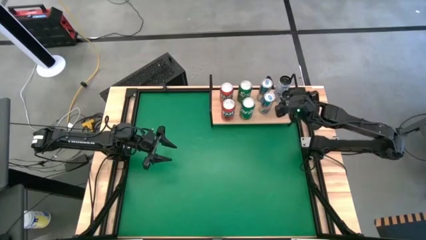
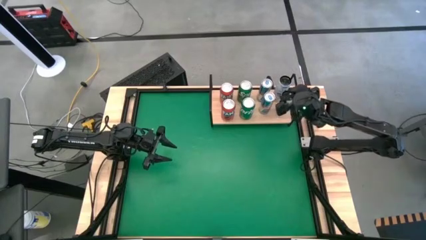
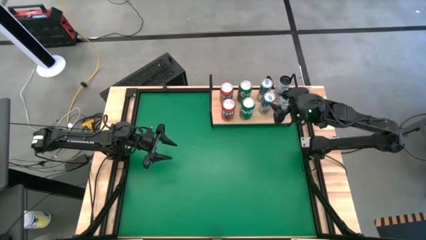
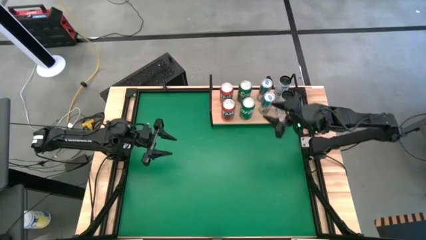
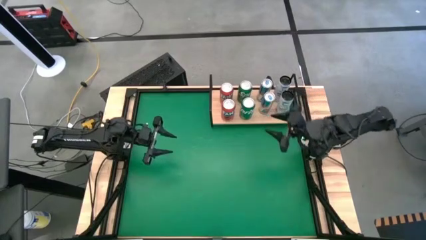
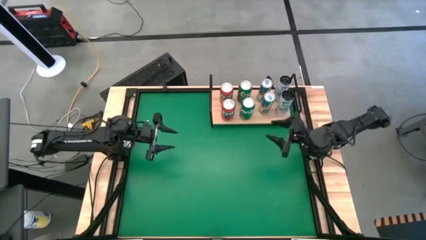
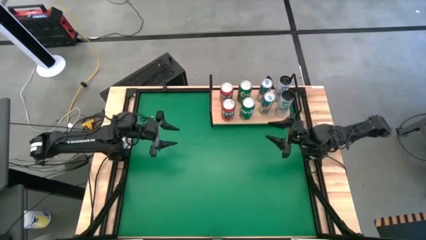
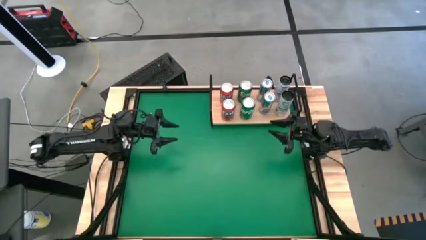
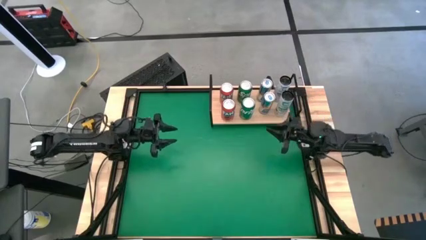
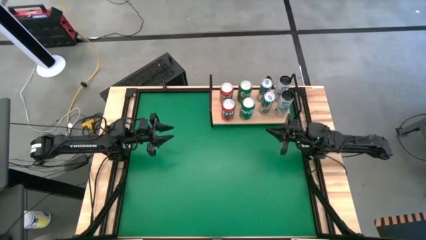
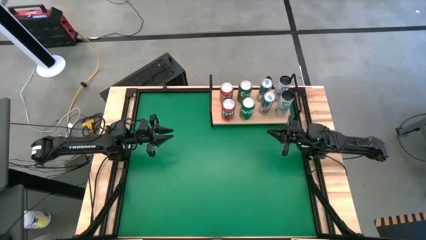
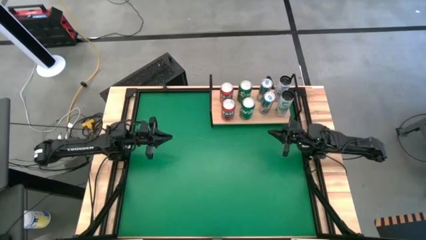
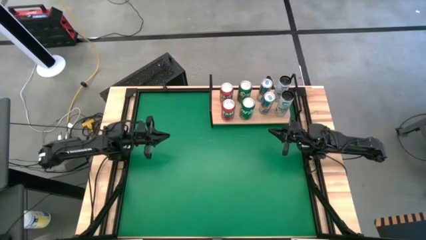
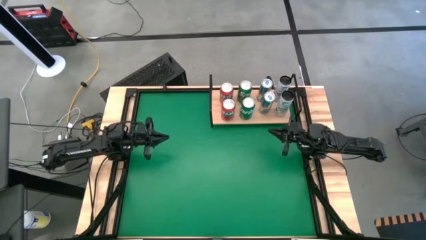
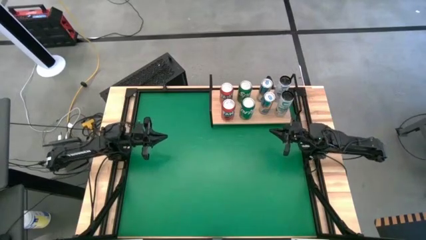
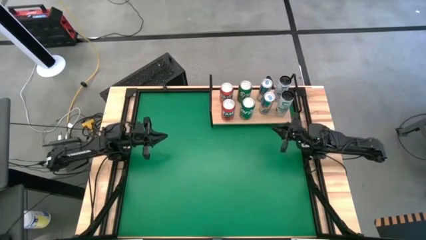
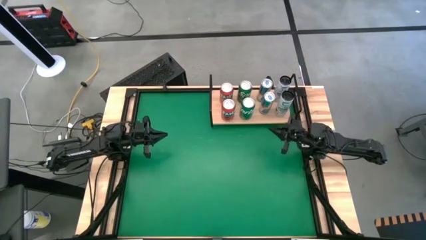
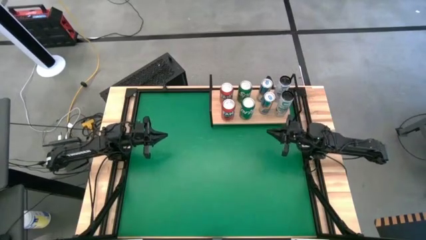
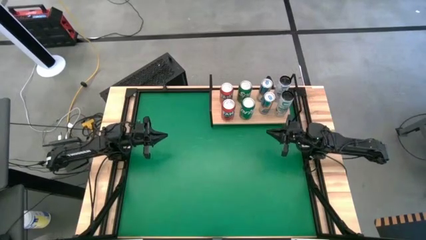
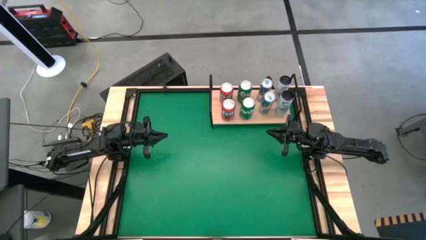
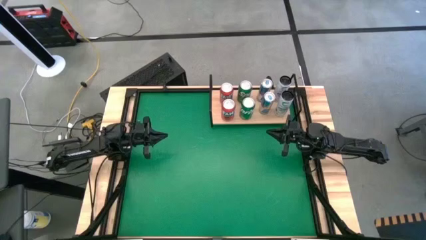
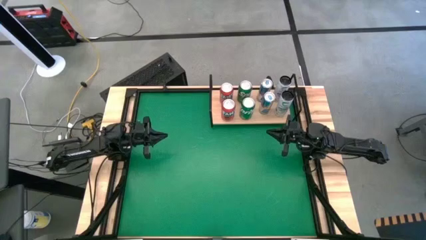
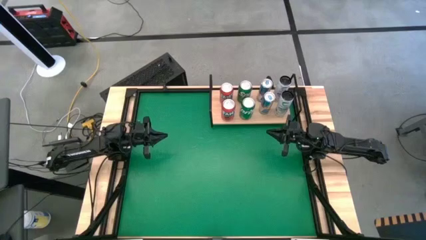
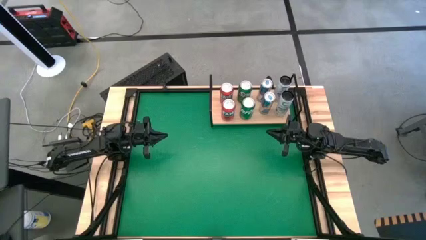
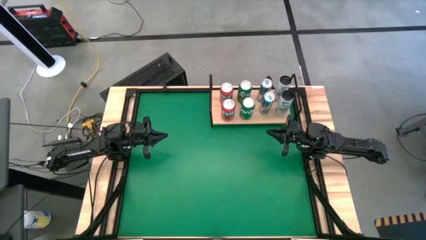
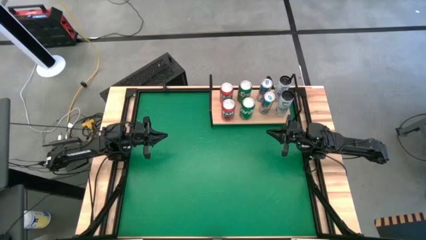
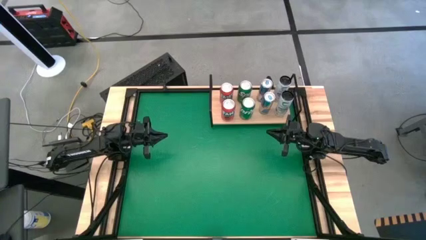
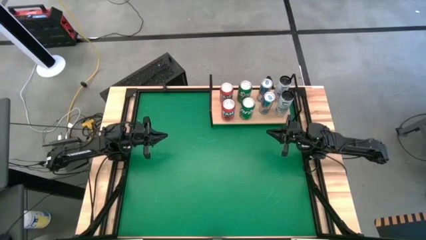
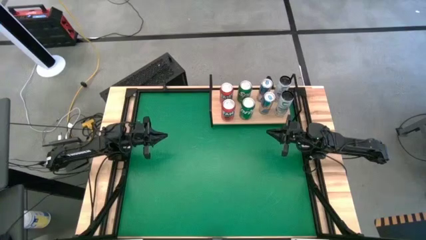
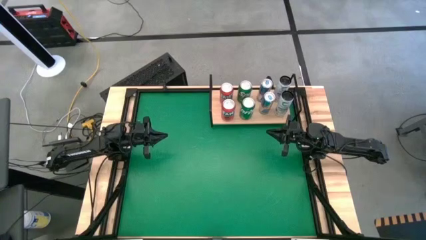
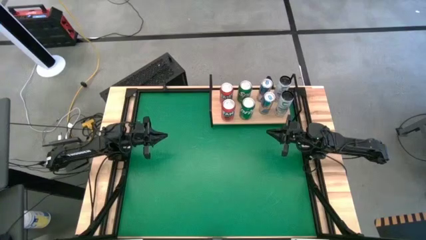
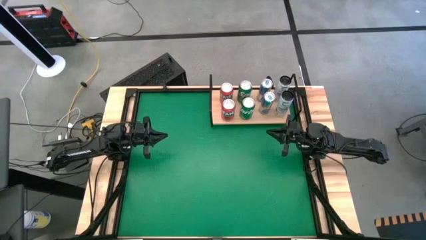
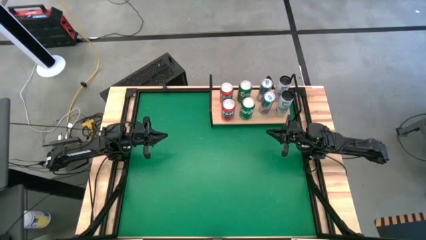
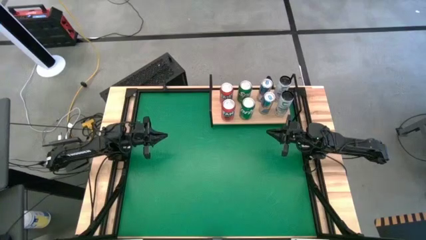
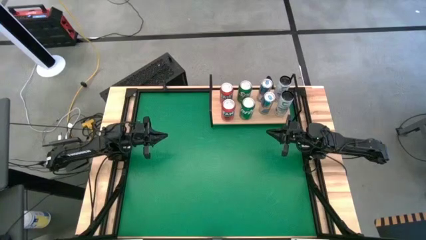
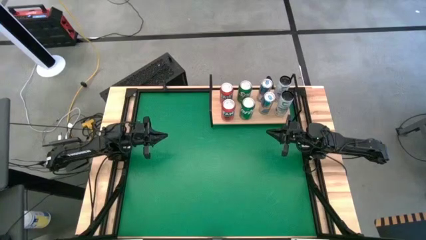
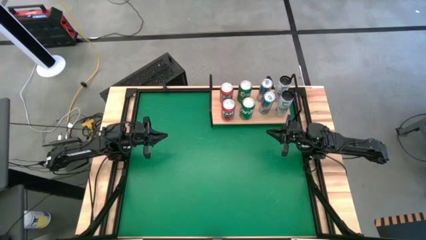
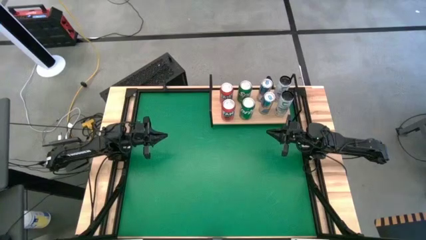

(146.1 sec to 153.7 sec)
Task: Place canned beverage on shelf
Return to Home Position

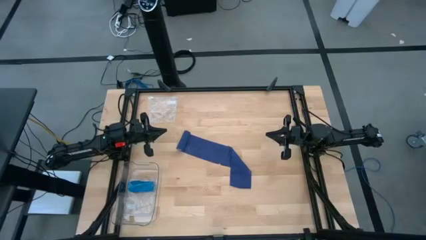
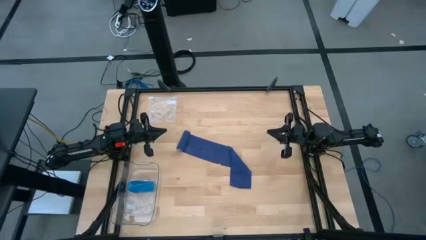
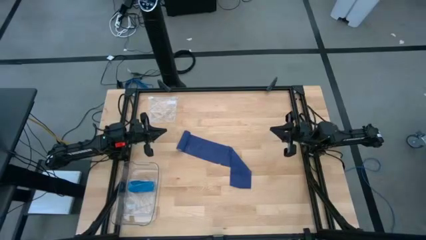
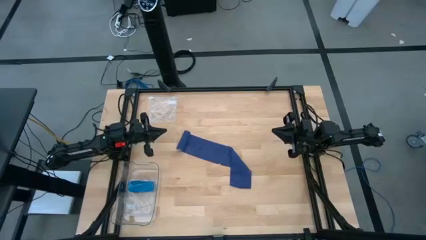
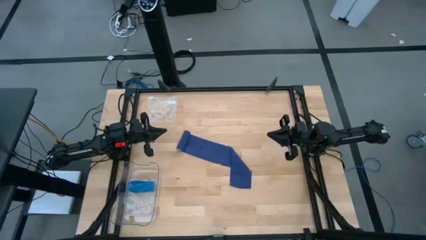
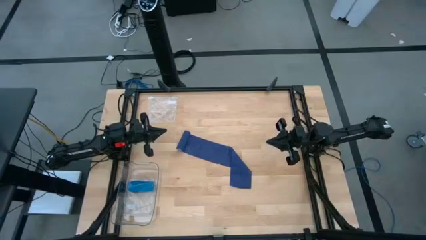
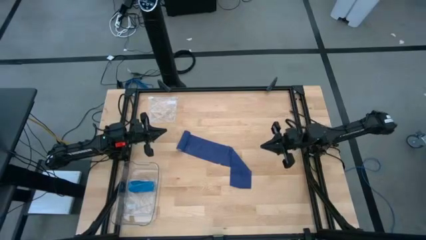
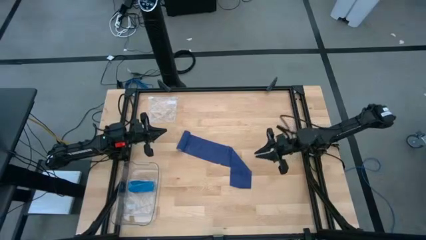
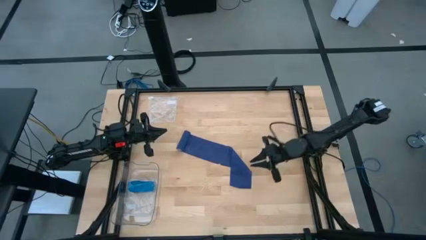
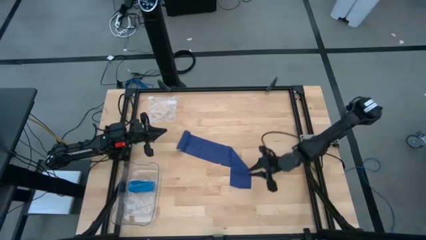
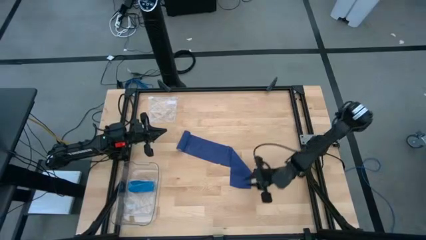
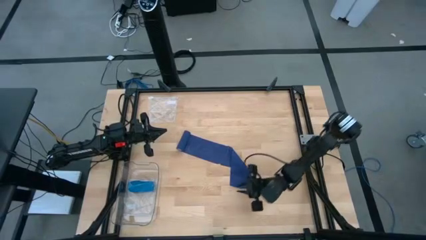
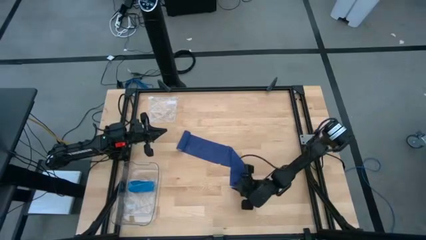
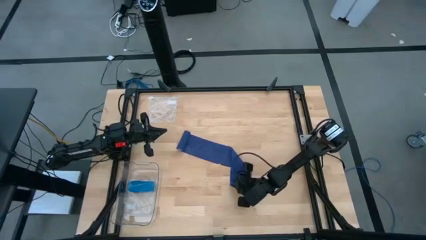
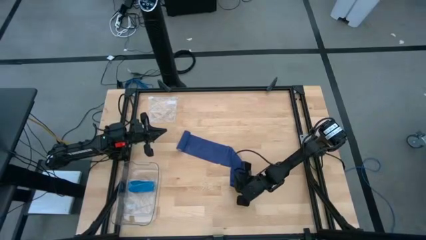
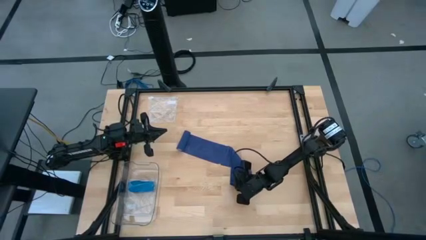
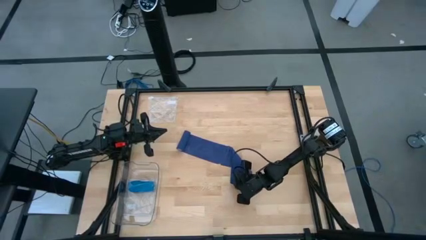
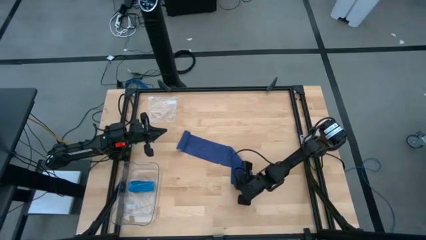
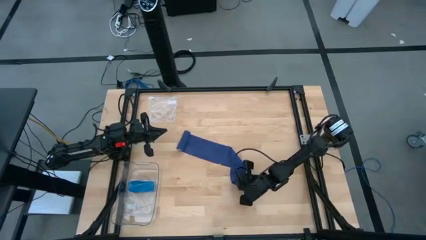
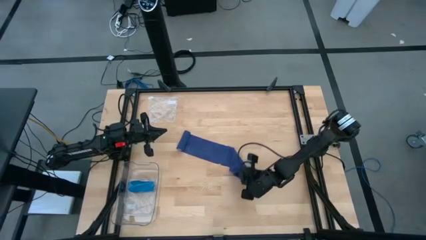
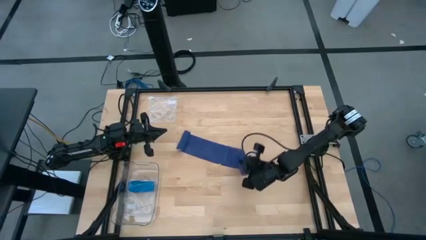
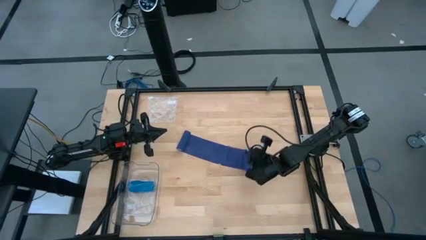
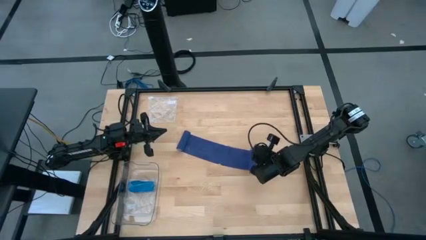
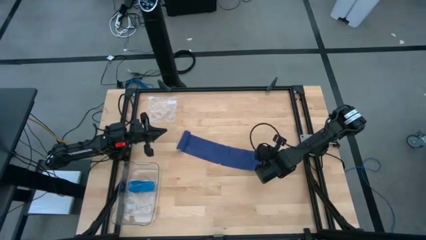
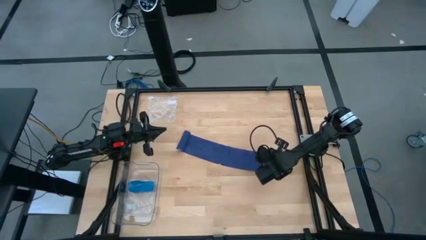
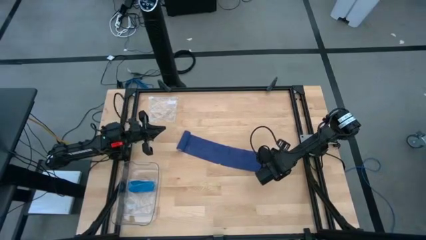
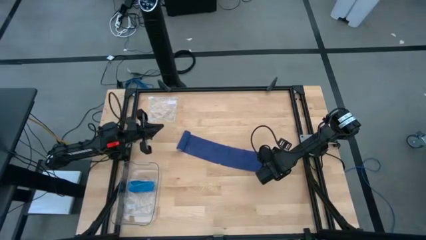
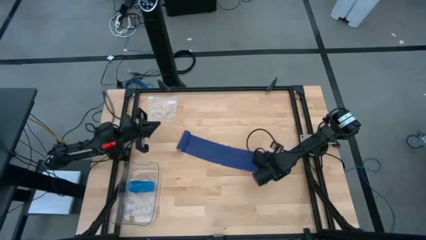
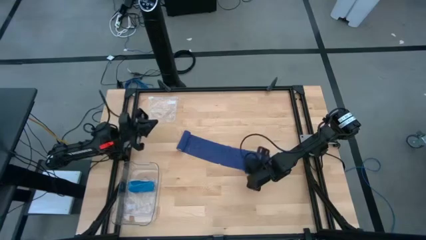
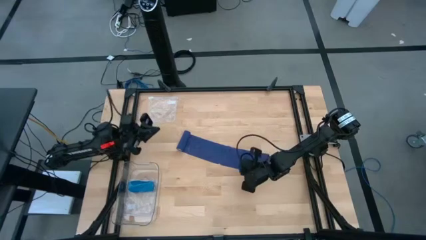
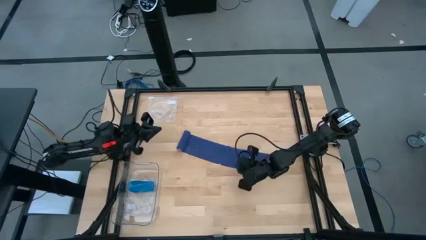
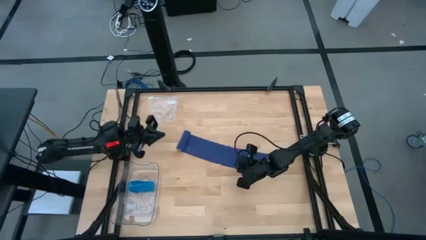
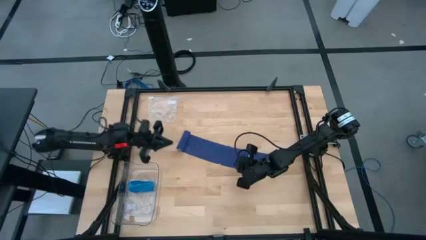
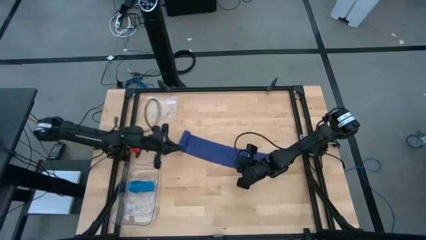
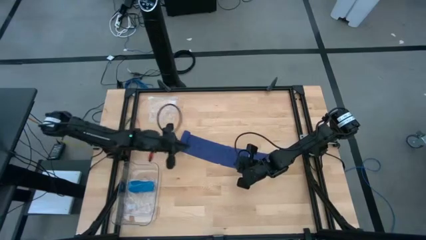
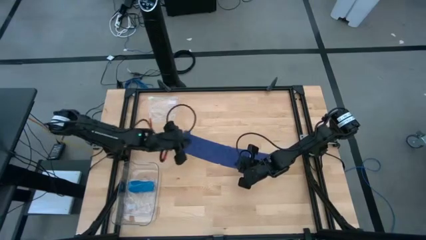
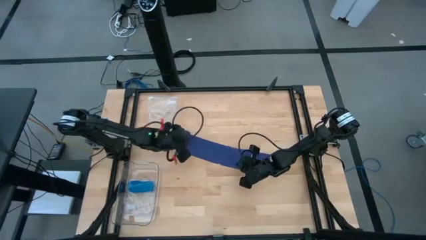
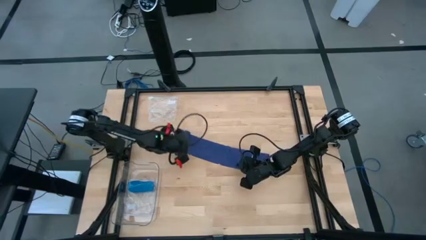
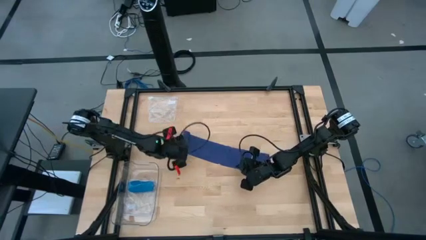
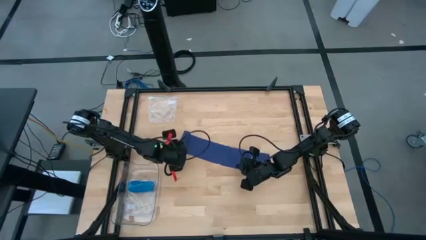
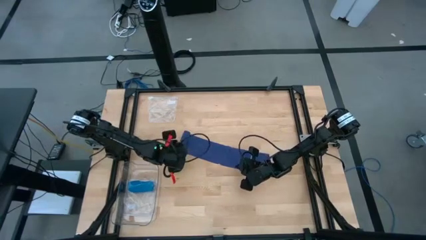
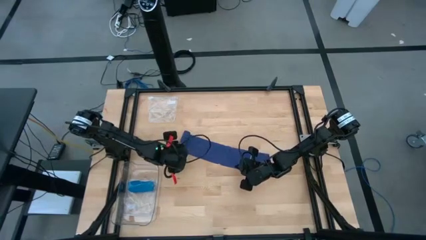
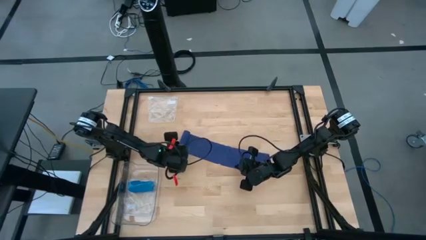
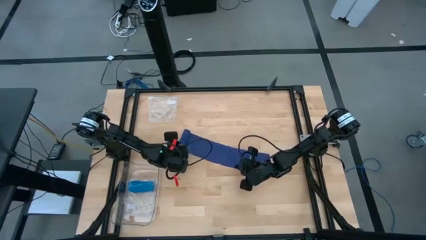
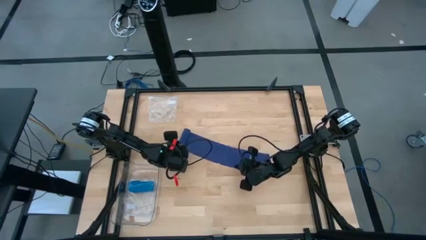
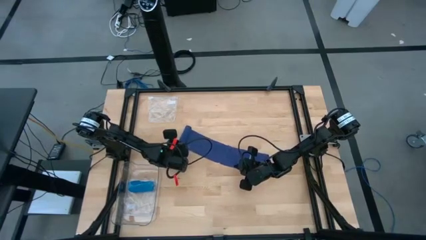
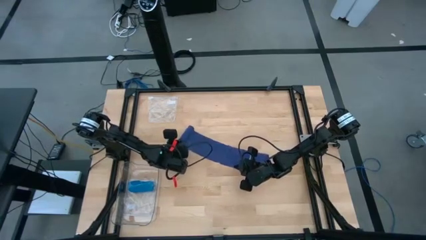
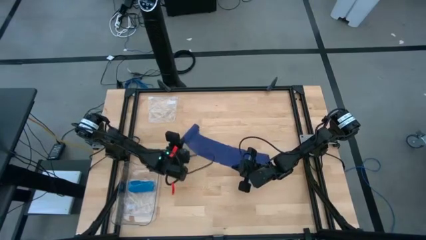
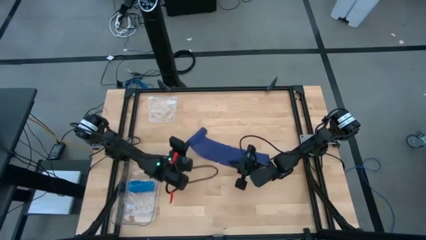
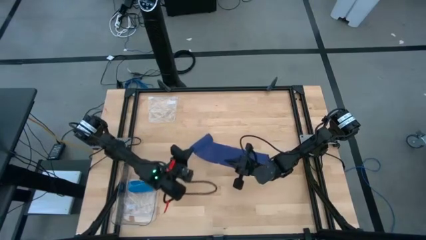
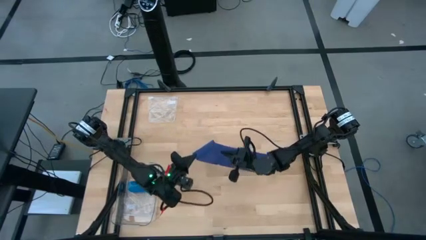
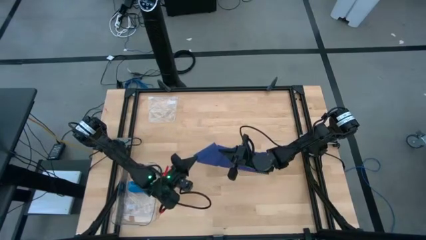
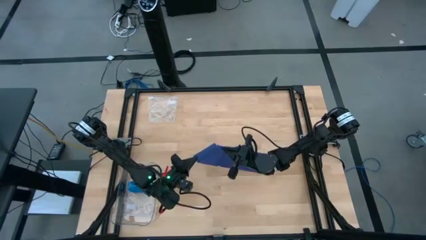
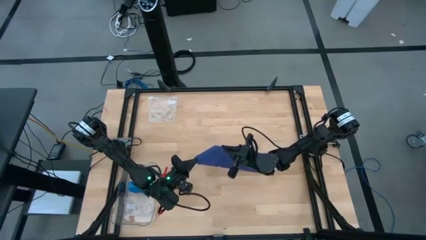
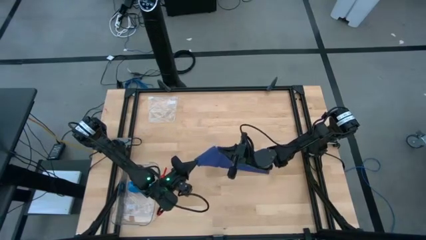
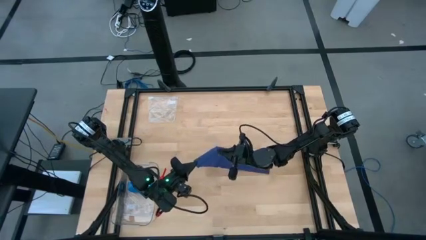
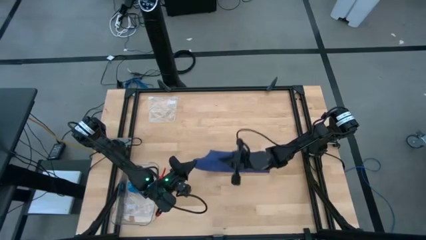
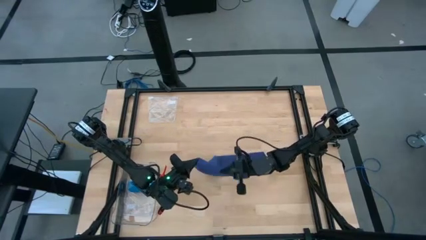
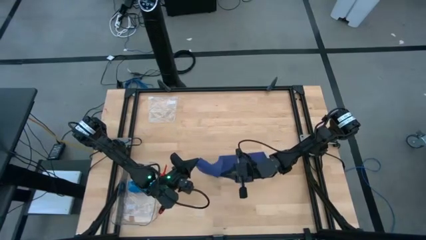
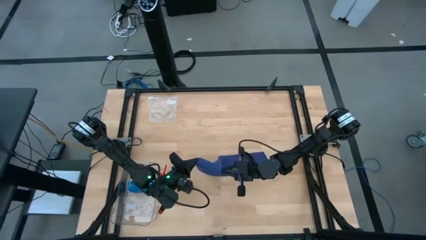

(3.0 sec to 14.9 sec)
Task: Roll bandage
Roll the blue bandage
